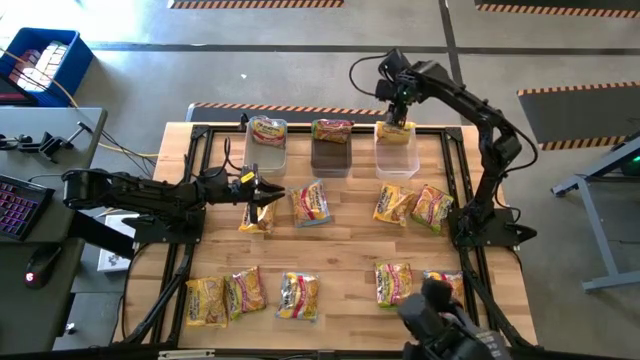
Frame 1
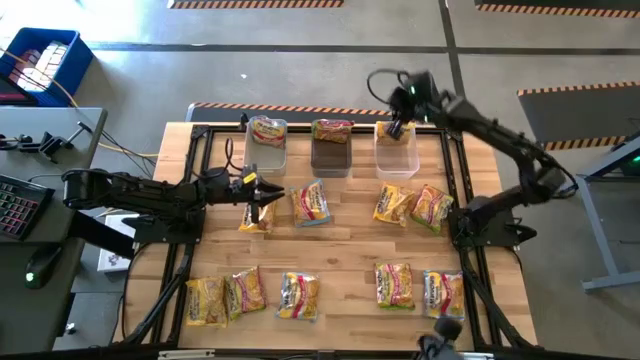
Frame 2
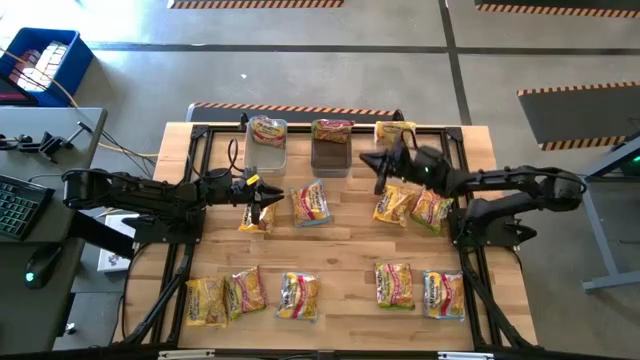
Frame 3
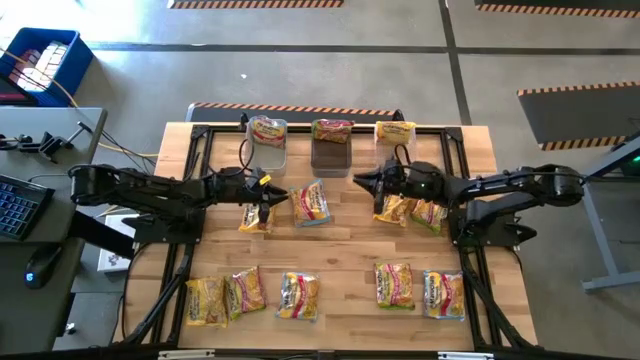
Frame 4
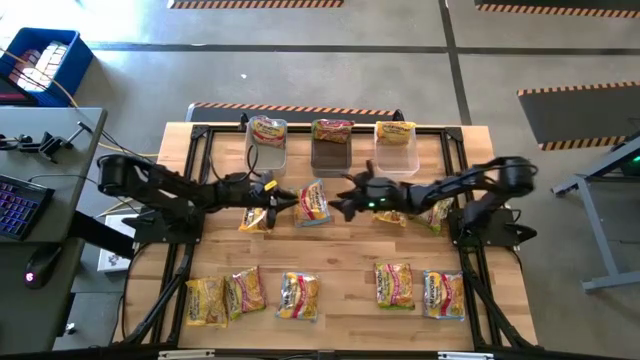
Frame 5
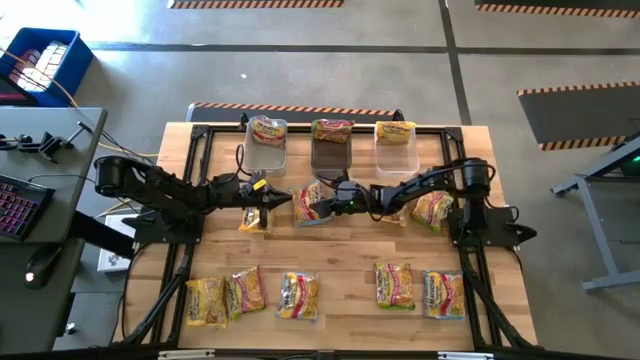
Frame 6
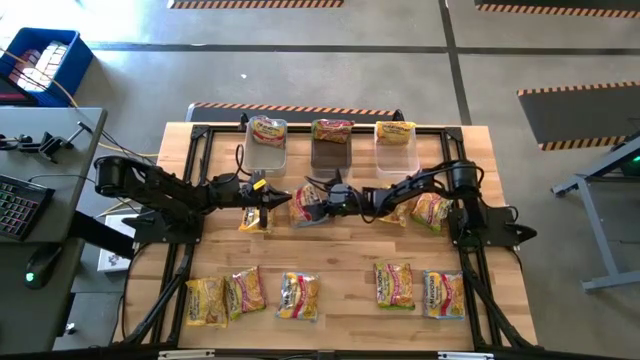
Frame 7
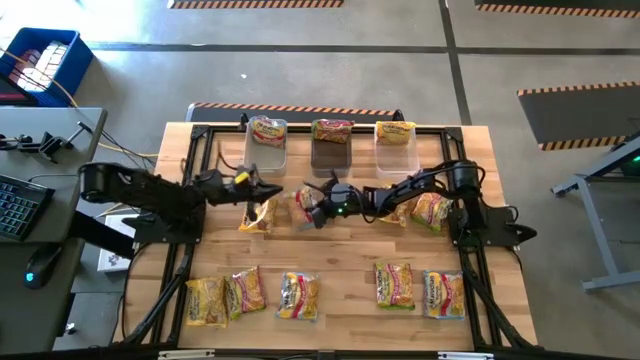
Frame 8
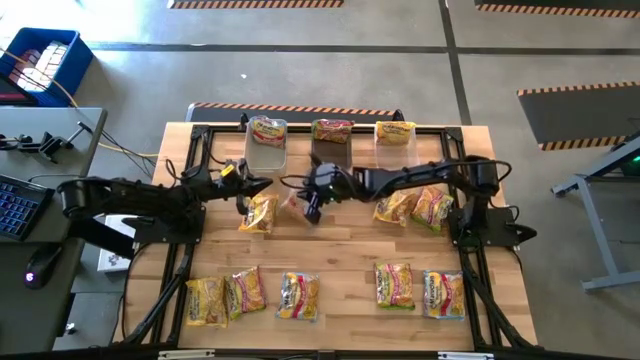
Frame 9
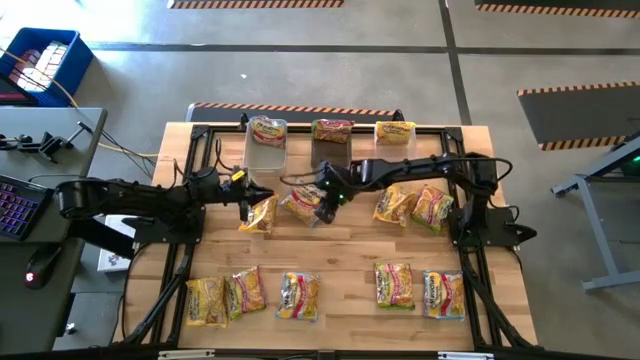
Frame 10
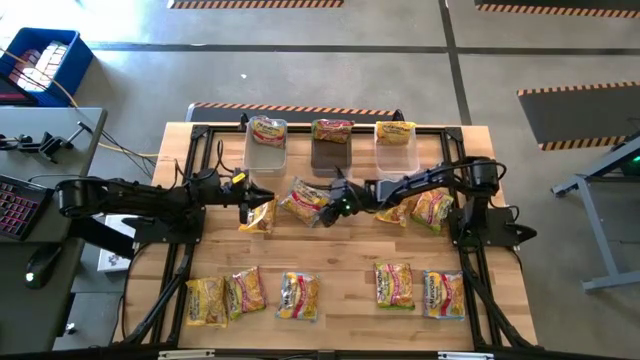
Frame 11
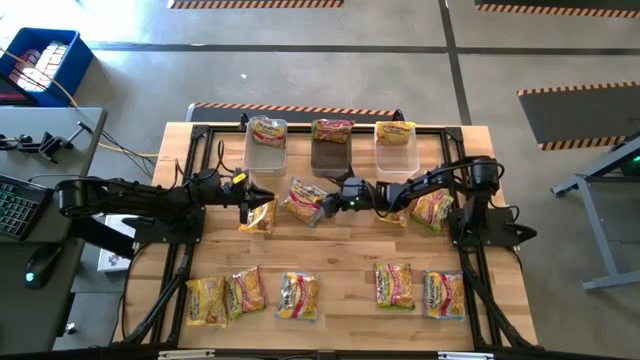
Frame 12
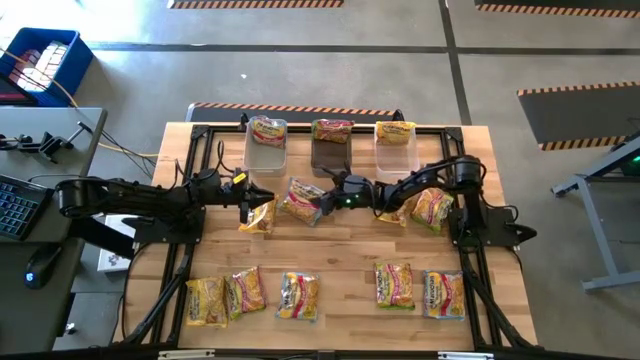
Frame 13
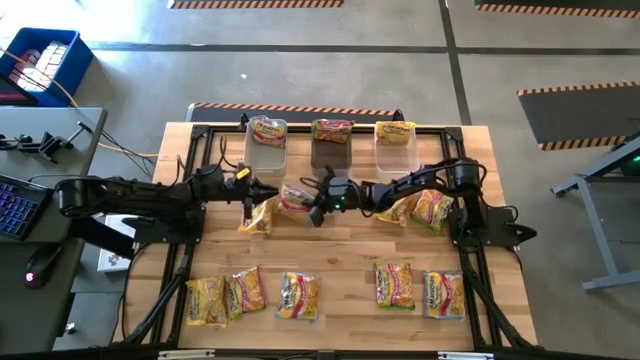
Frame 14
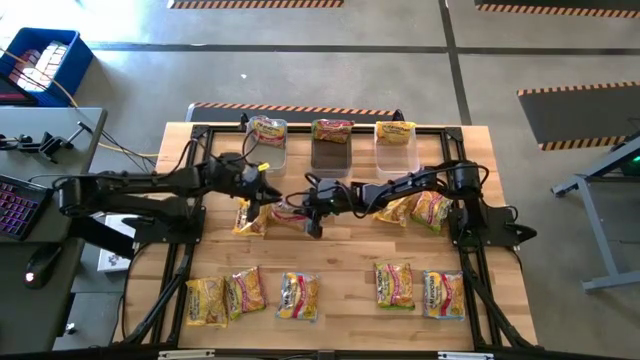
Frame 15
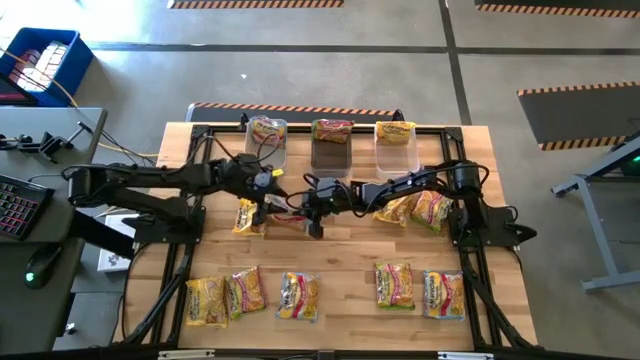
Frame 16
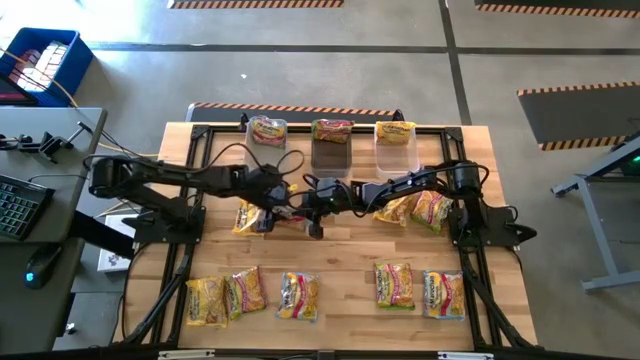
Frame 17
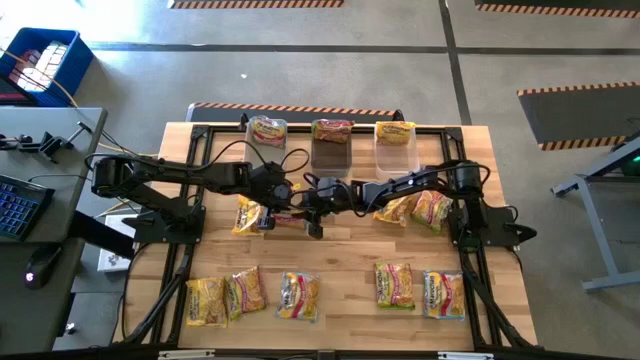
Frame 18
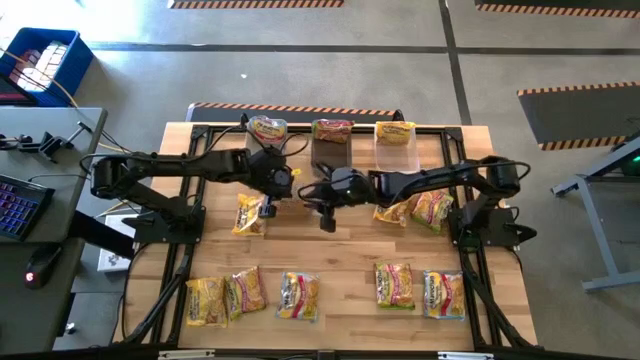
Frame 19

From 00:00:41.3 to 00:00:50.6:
Task: Sort Maruchan noodles
Put the blue noodle pack into the gray bin

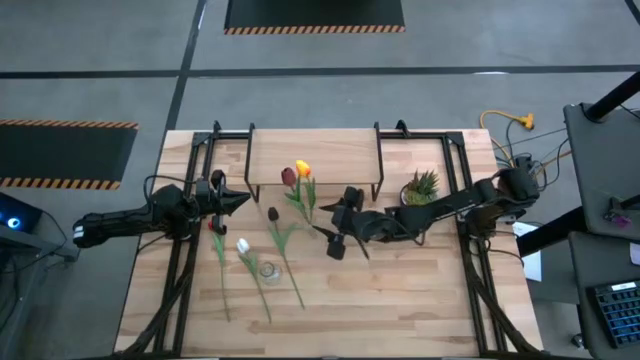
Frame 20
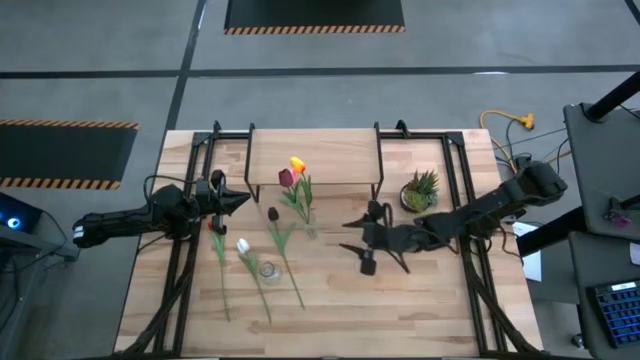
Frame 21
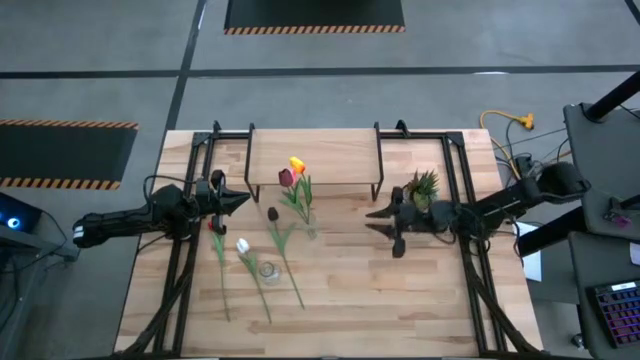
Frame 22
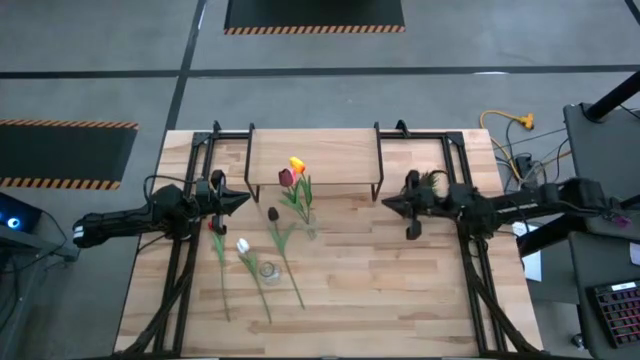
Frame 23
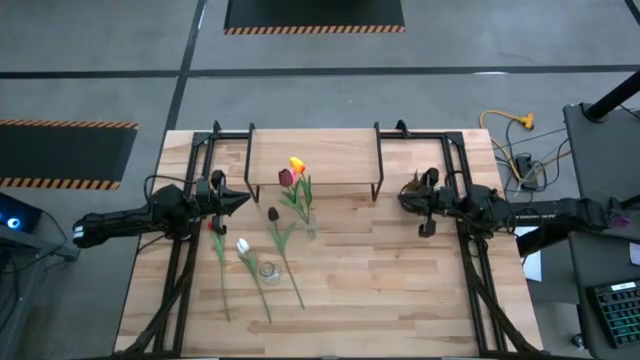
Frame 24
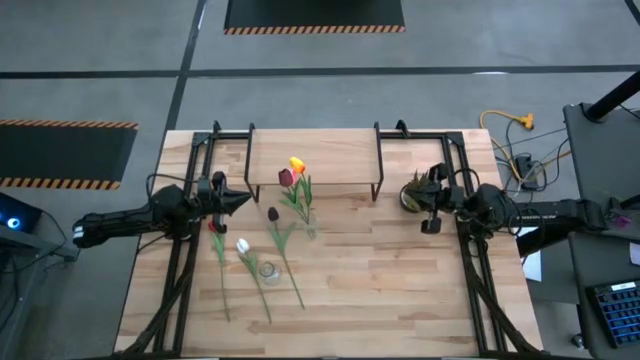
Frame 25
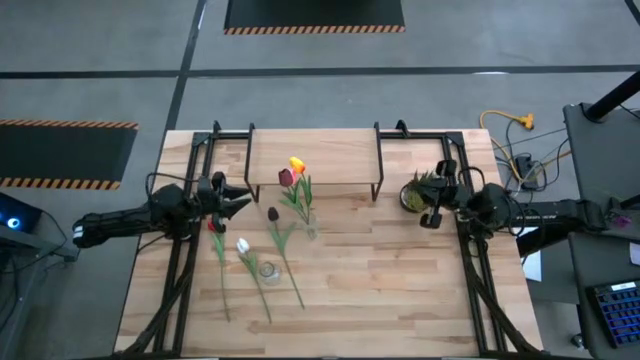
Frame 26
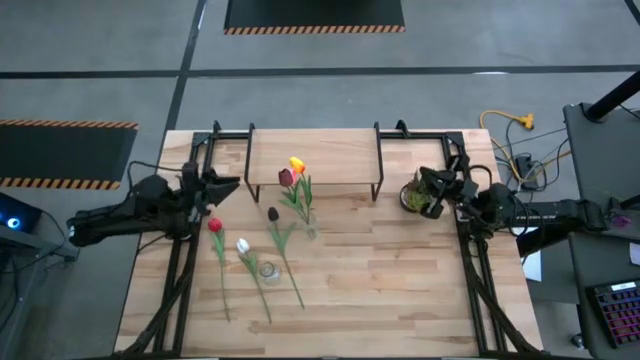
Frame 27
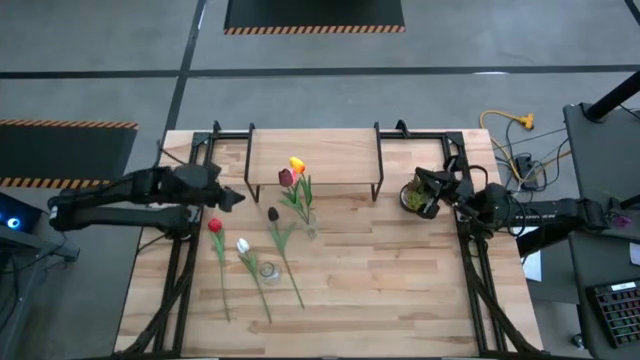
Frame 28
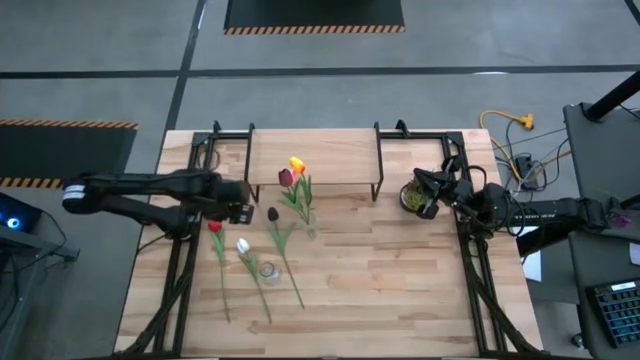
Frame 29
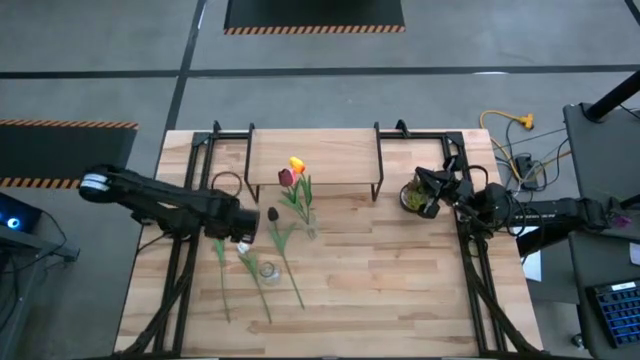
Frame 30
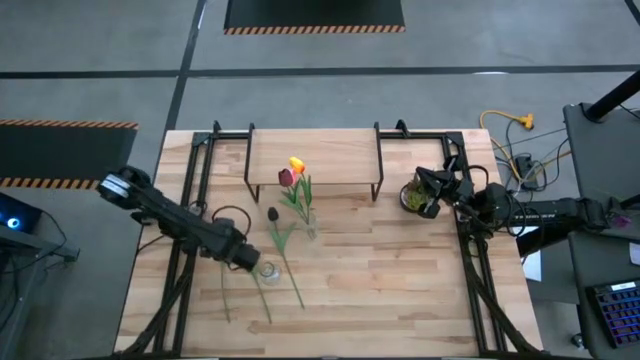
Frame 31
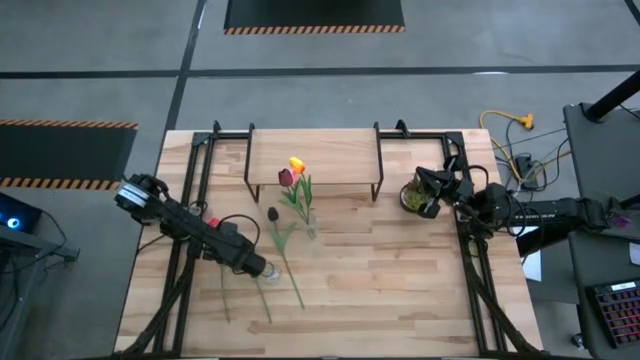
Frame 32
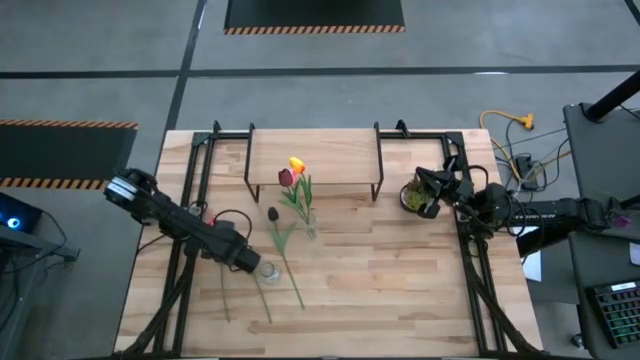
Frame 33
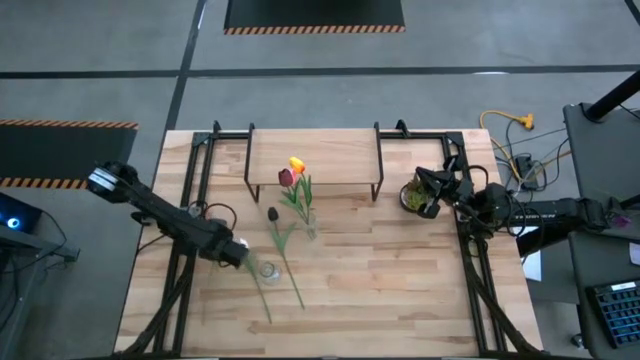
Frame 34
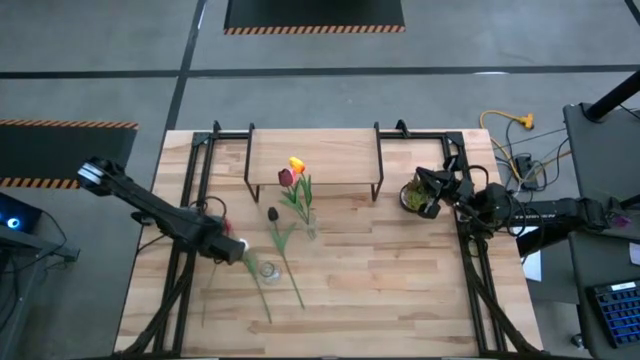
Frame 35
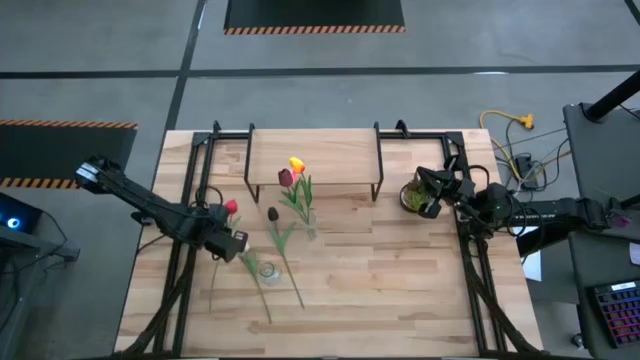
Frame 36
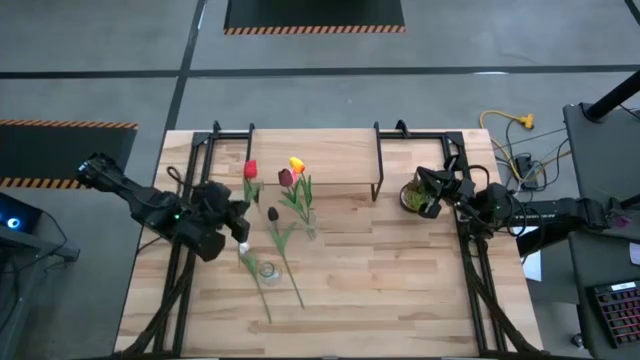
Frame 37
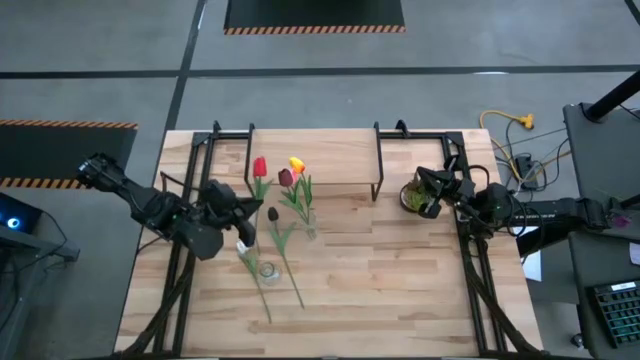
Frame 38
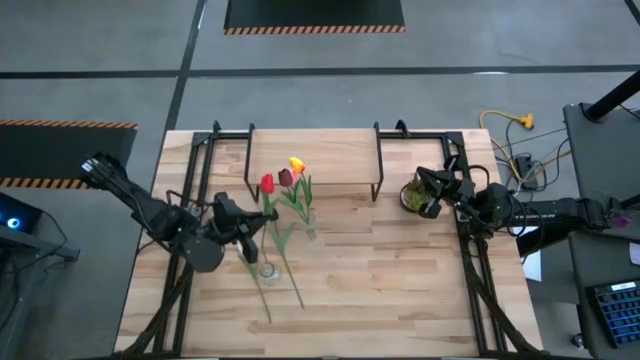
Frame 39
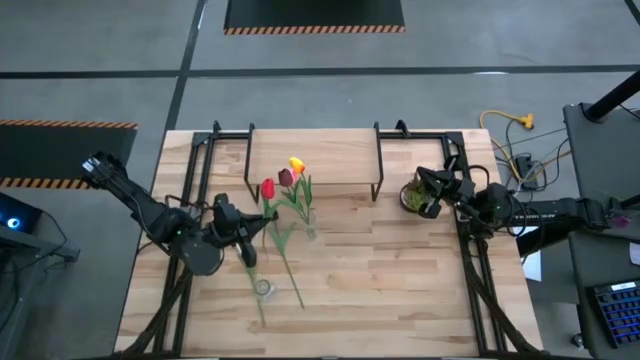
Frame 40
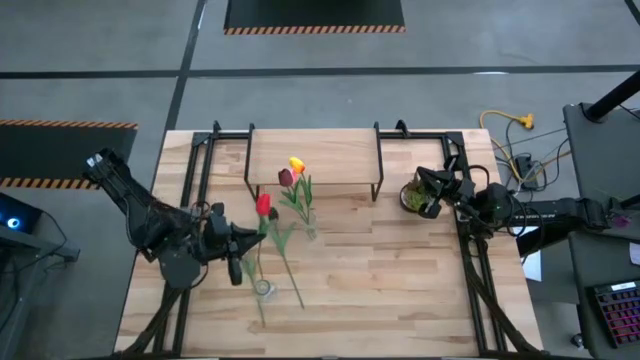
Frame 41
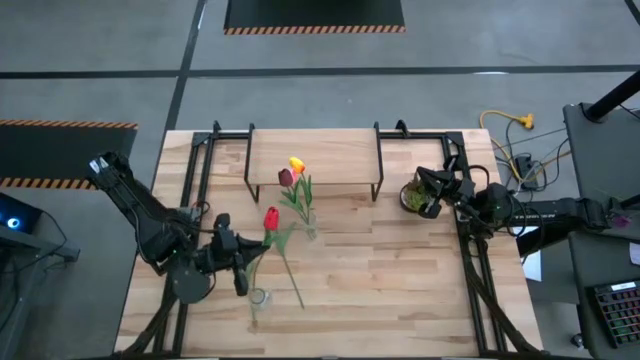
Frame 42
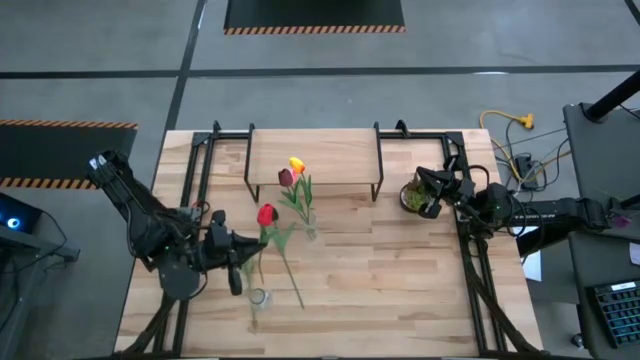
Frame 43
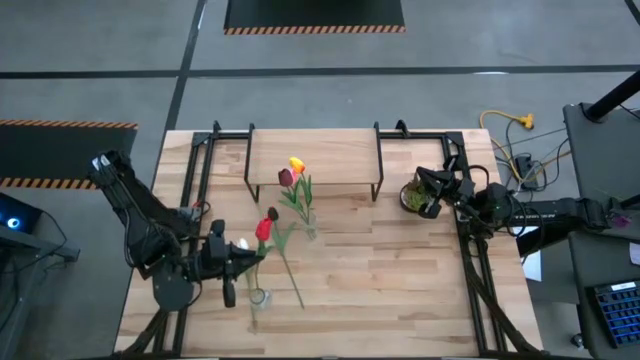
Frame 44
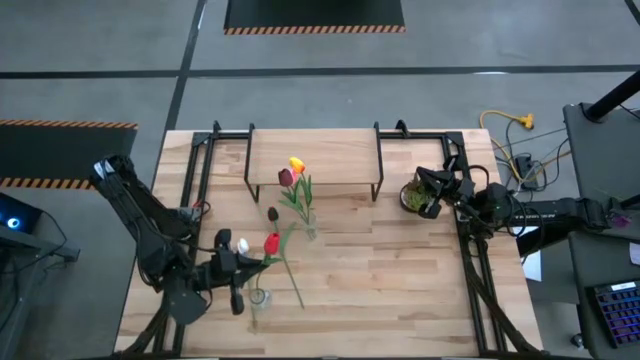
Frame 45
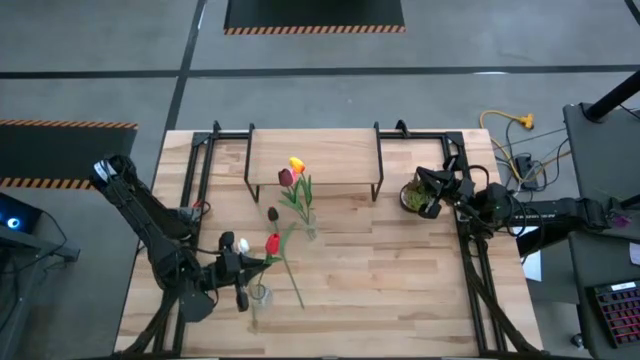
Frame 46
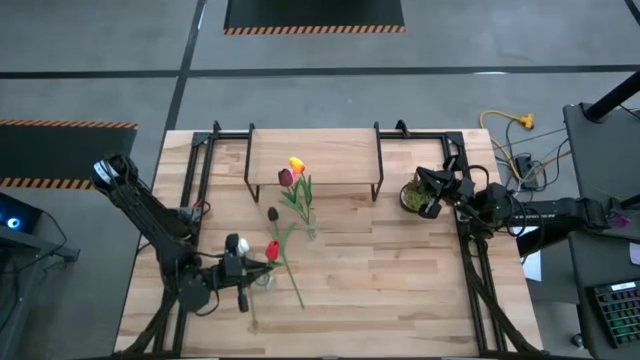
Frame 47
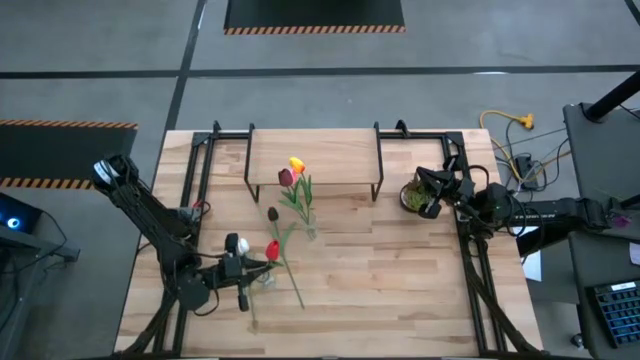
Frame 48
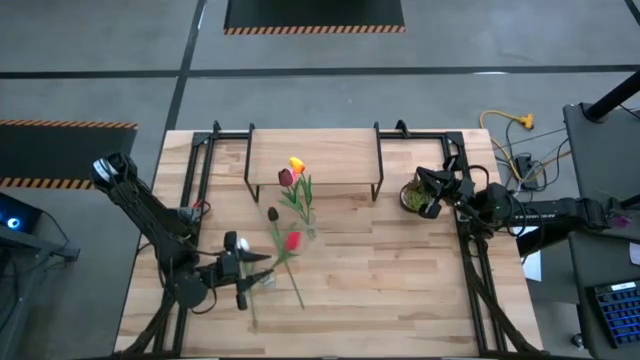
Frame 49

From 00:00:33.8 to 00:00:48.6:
Task: Pick and place flowers into a vace then onto a shelf
Put the red flower into the bottom transparent vase
